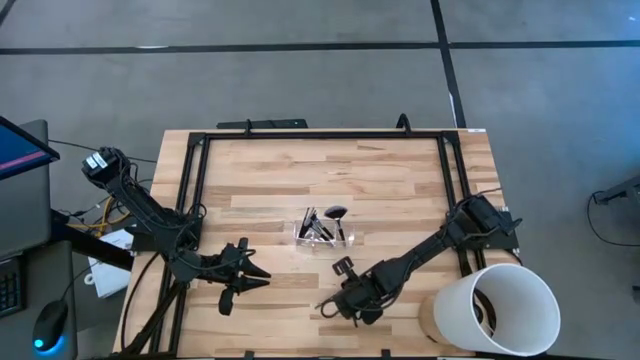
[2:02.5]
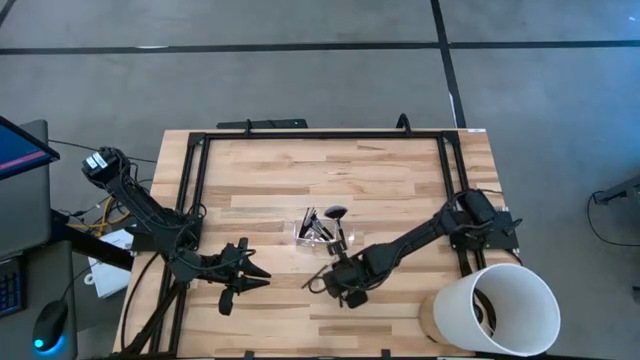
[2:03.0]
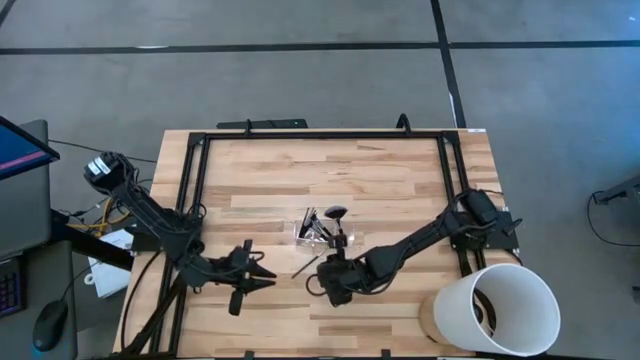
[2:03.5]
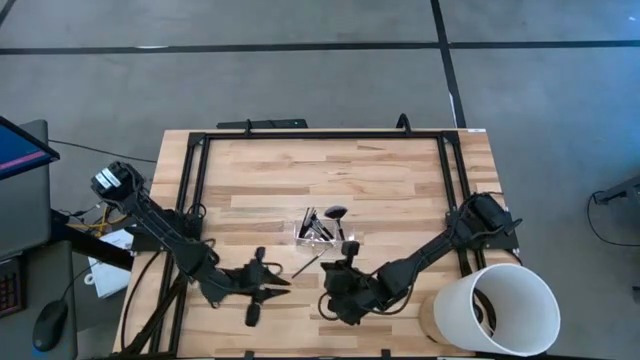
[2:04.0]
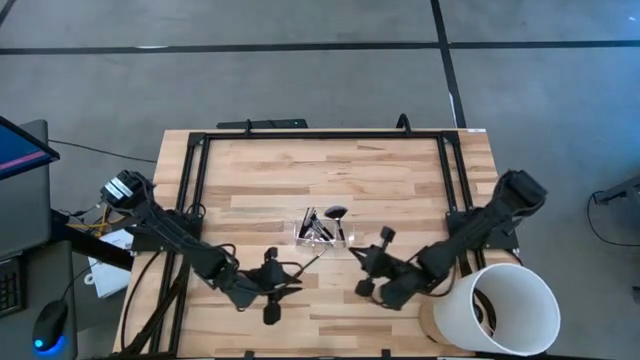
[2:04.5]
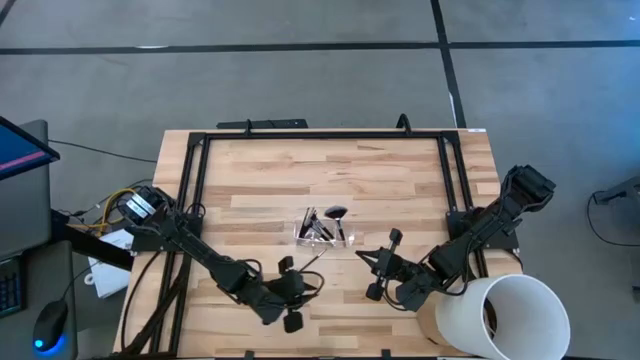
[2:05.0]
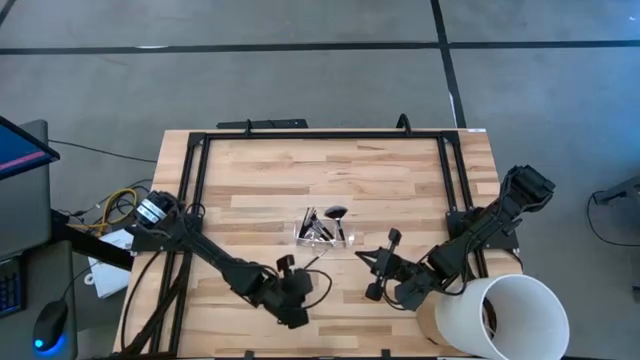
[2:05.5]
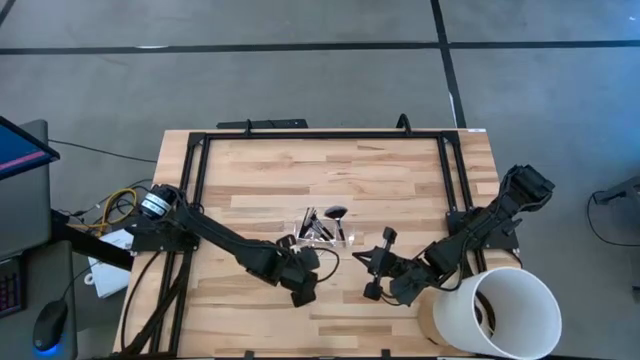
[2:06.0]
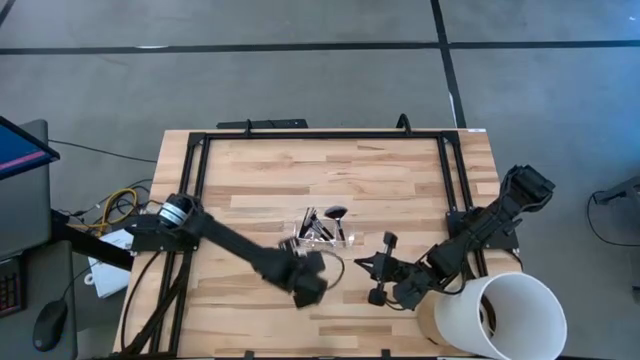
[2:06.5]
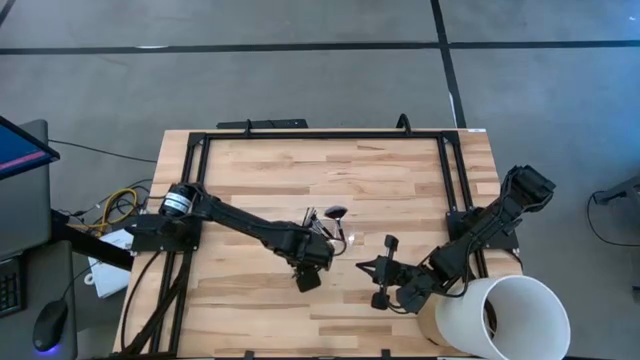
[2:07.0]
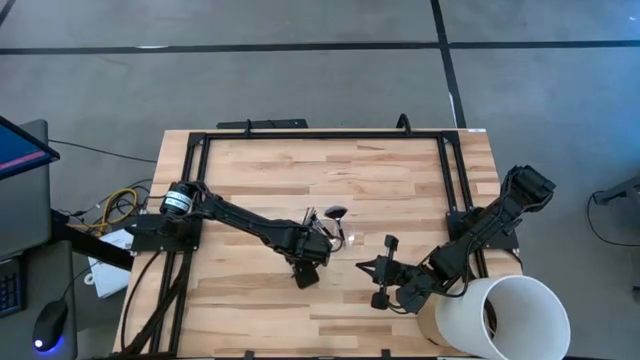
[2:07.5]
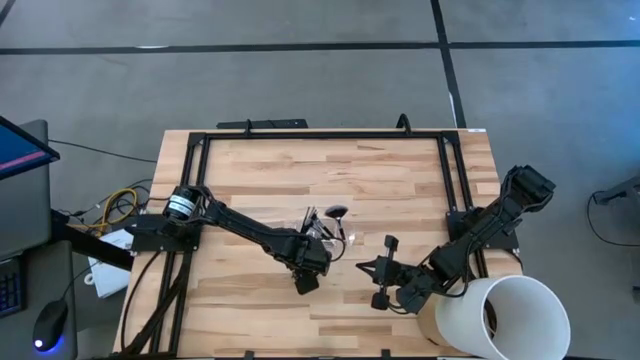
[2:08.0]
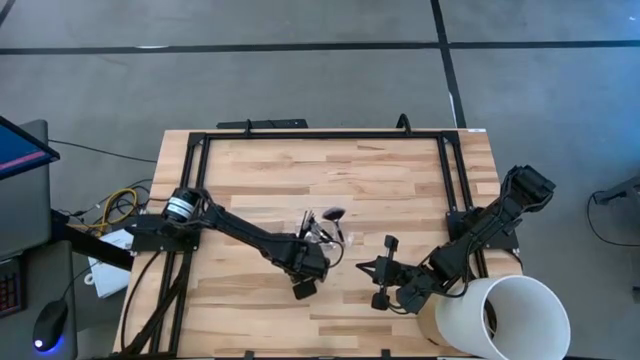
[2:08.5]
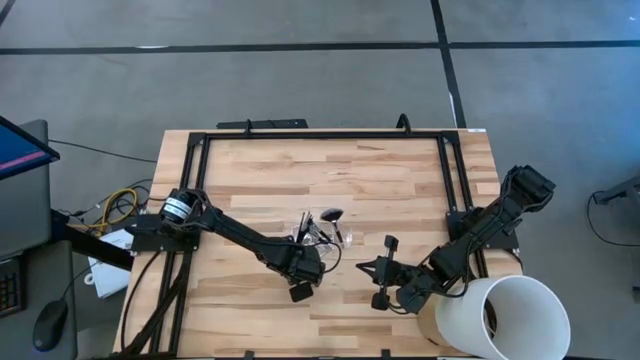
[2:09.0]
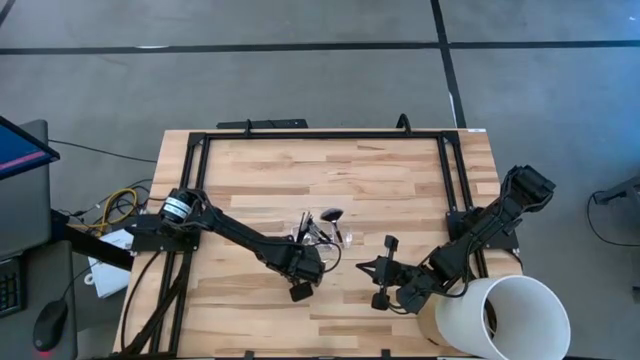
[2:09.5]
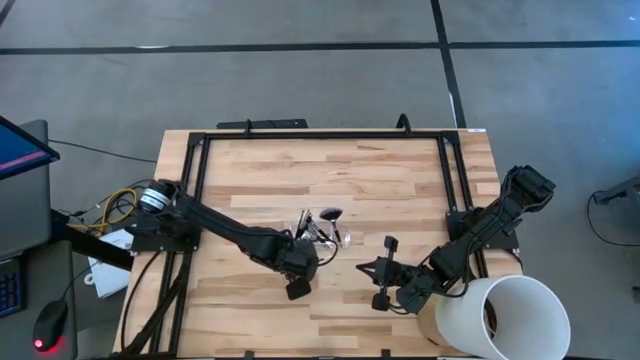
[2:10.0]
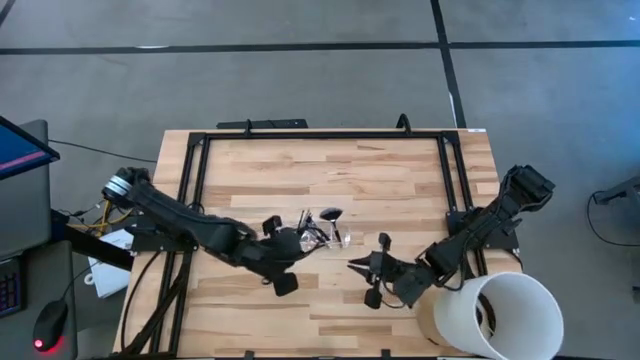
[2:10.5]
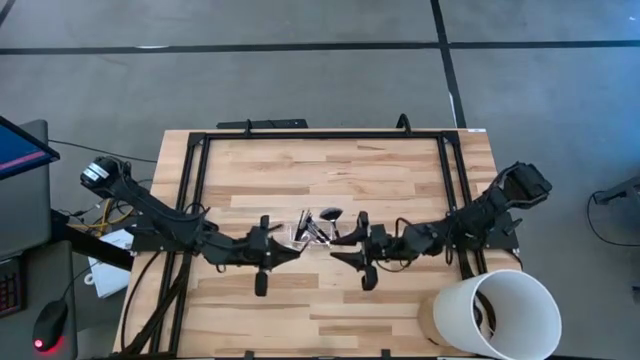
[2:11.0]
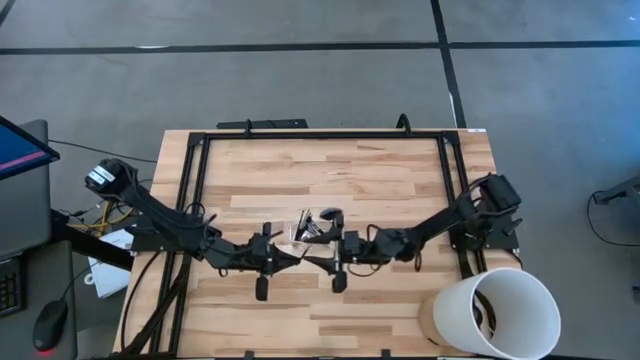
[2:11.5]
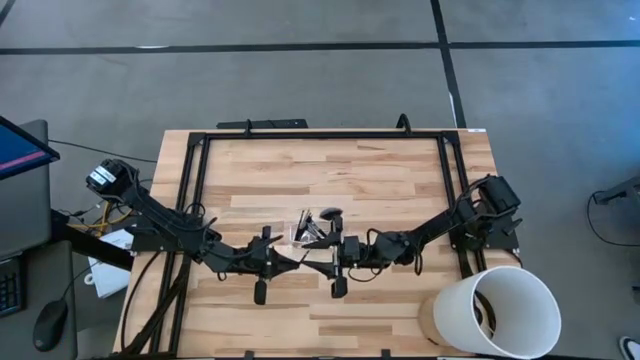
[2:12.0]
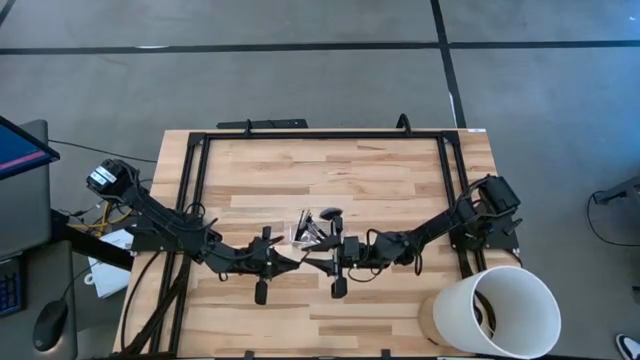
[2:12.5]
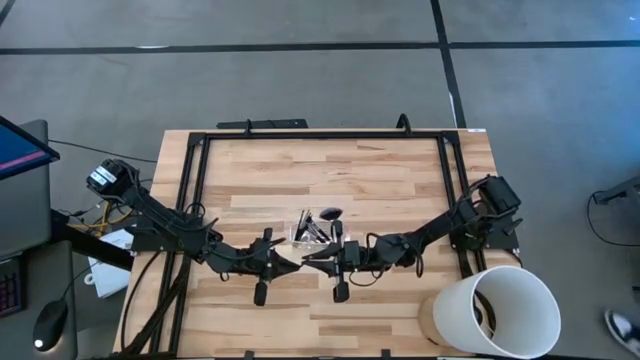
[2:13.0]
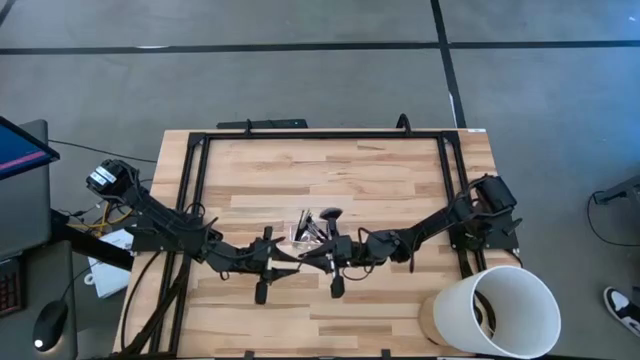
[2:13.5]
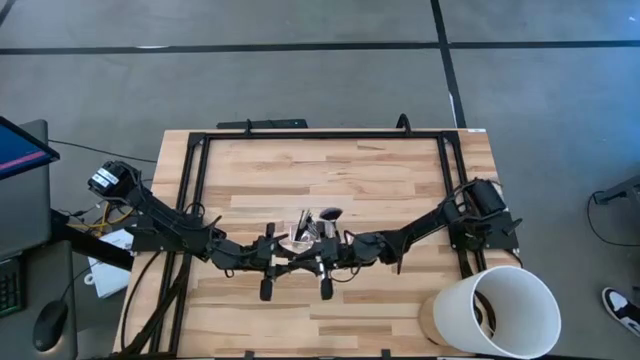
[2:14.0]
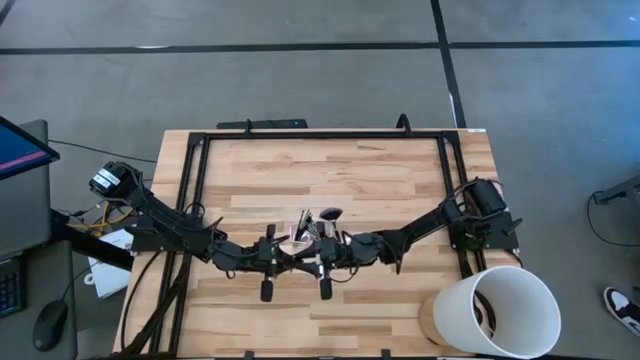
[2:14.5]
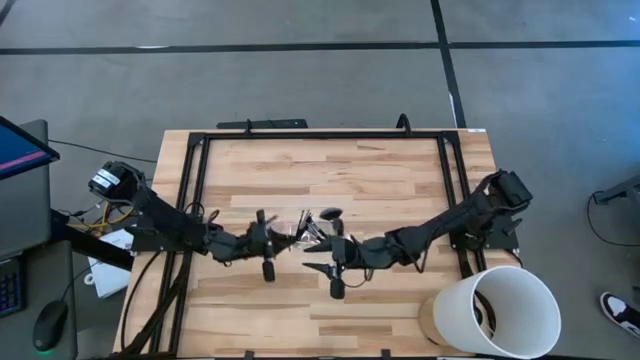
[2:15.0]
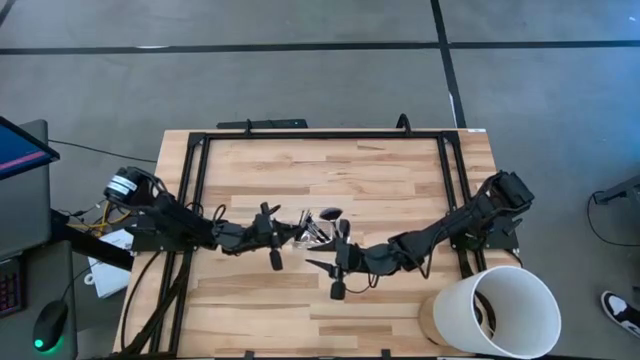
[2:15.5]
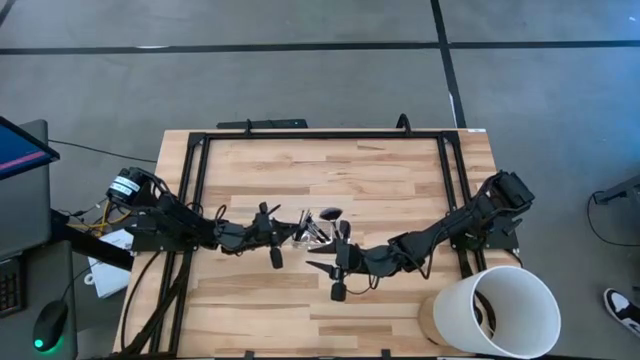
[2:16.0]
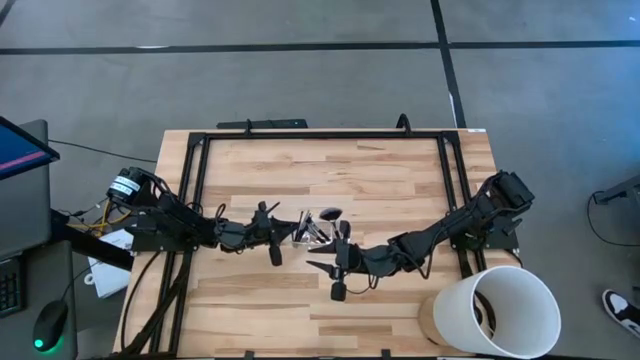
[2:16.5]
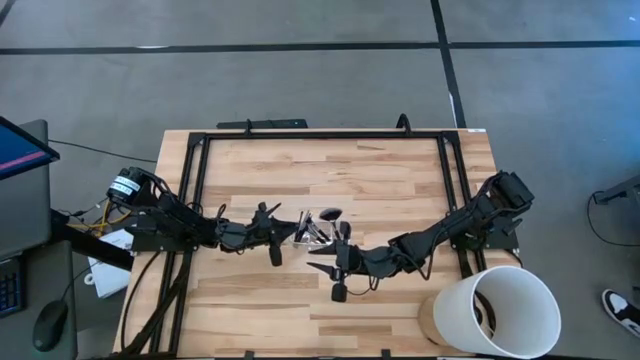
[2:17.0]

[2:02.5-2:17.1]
Task: Put items in baskets/containers
Put the liner brush into the left section of the transparent organizer

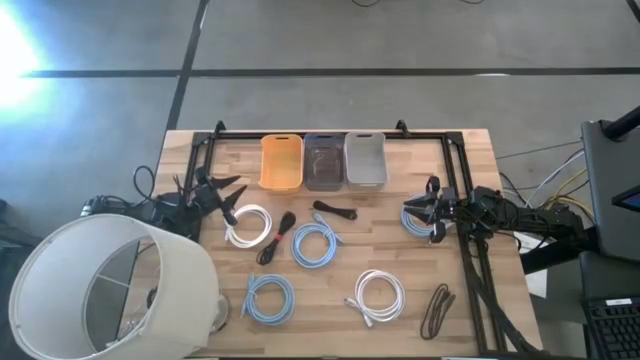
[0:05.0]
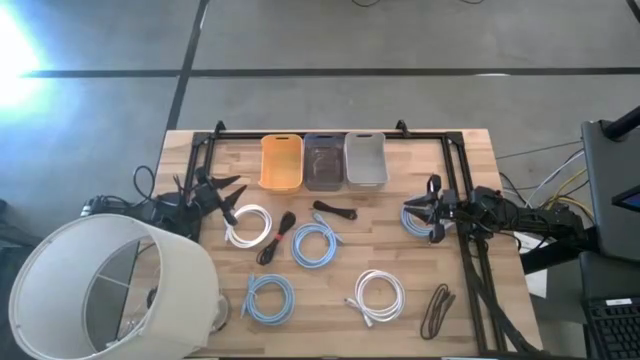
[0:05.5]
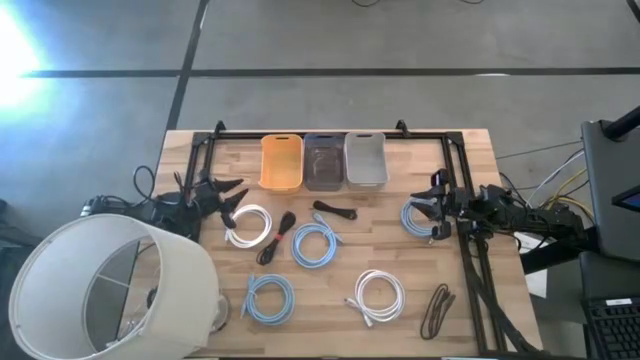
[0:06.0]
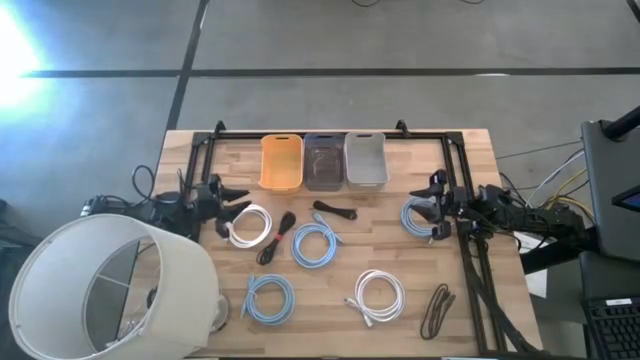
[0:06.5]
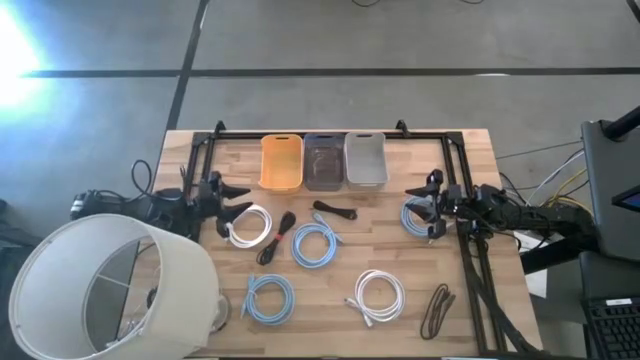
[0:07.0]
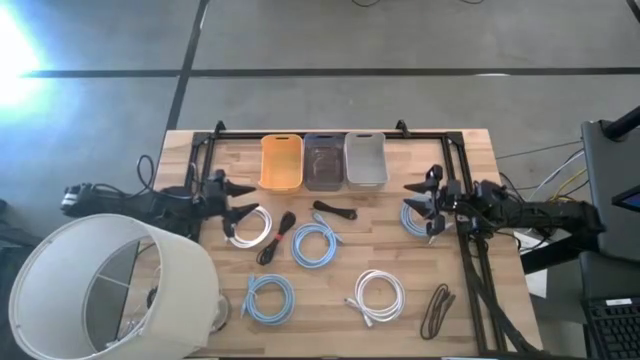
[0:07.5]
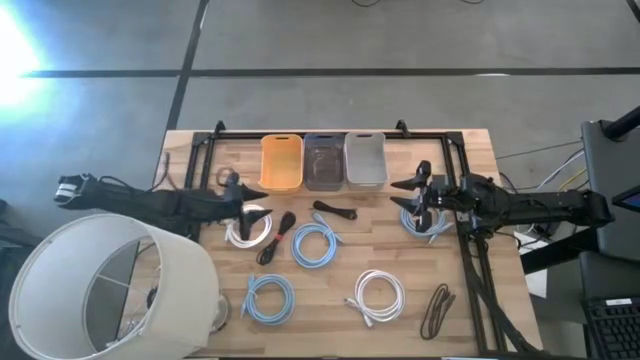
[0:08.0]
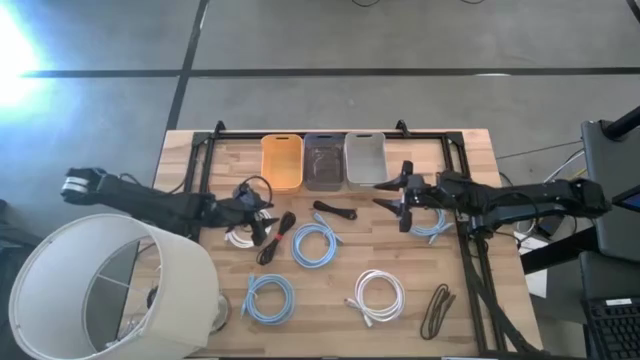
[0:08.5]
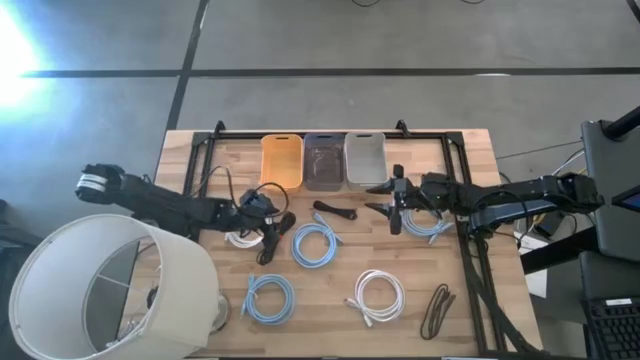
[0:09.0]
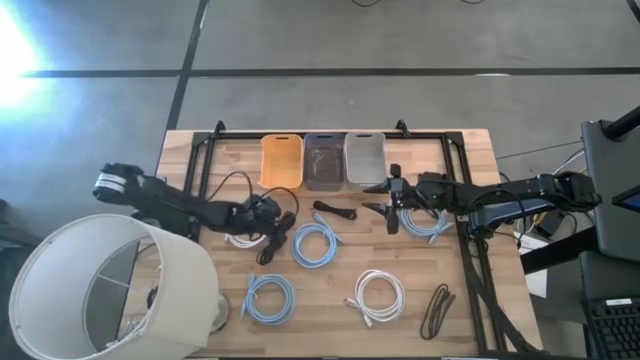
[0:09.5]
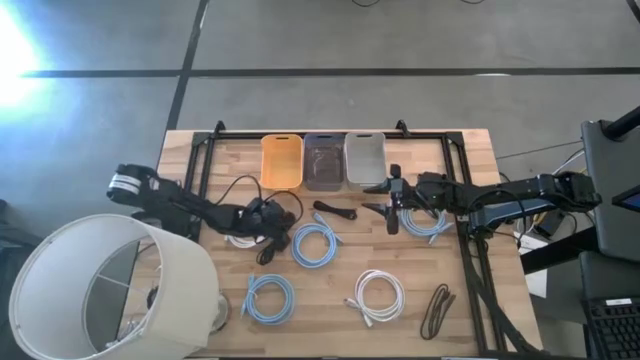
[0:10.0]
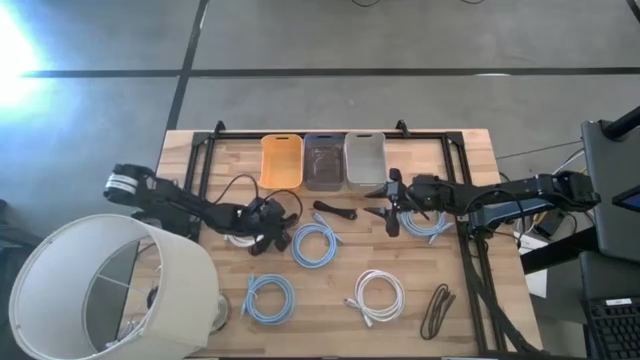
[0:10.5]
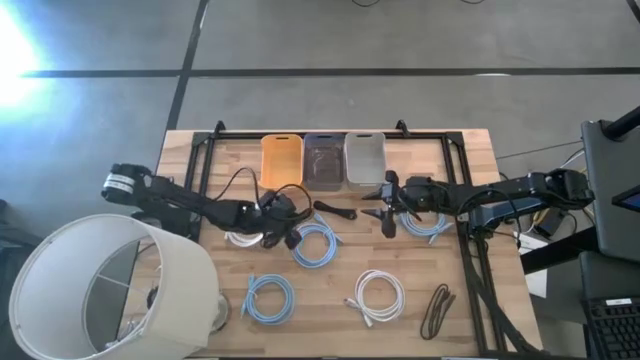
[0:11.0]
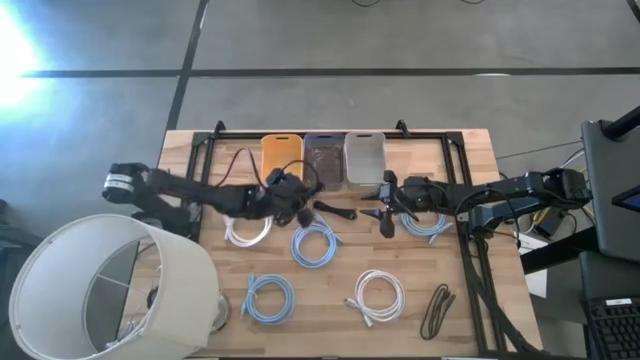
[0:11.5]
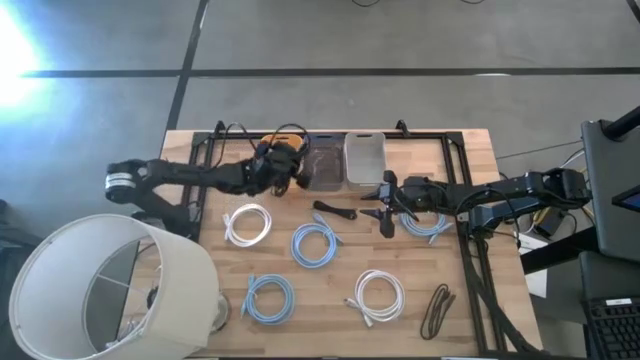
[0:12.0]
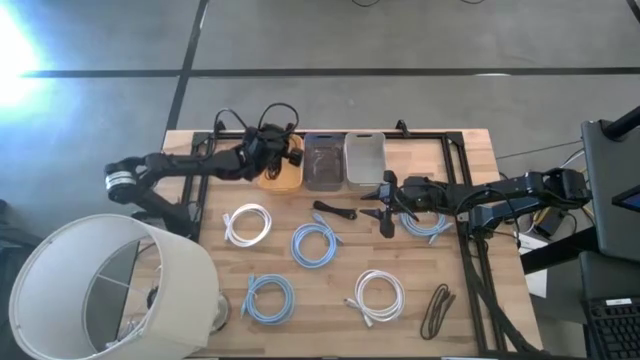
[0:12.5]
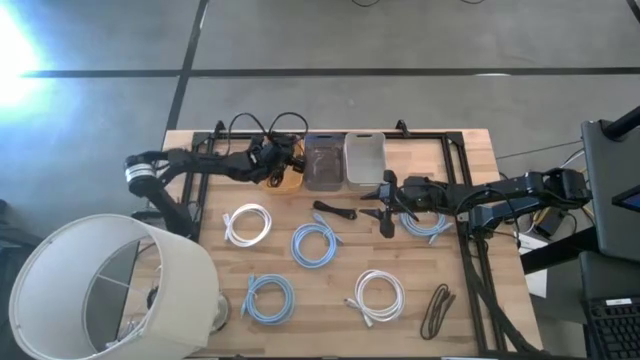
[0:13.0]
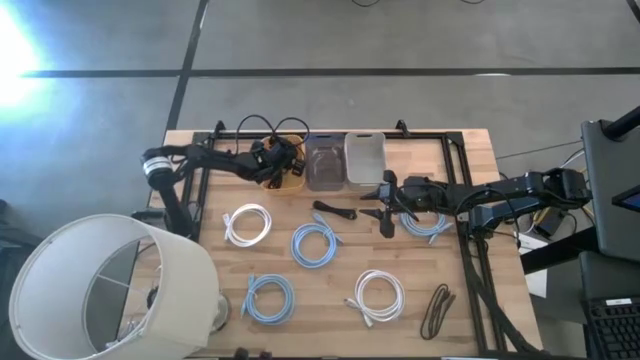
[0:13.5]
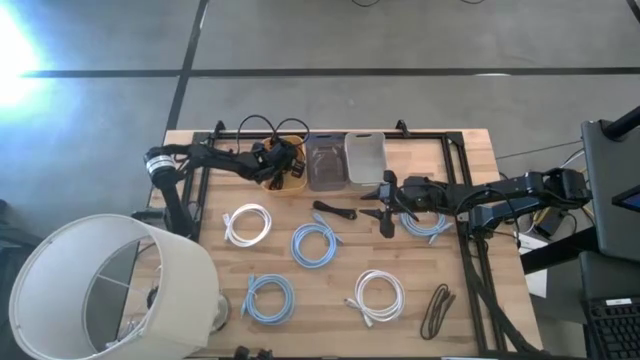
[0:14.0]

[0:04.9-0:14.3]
Task: Pick & Place USB Port
Put the middle black usb cable into the yellow bin
